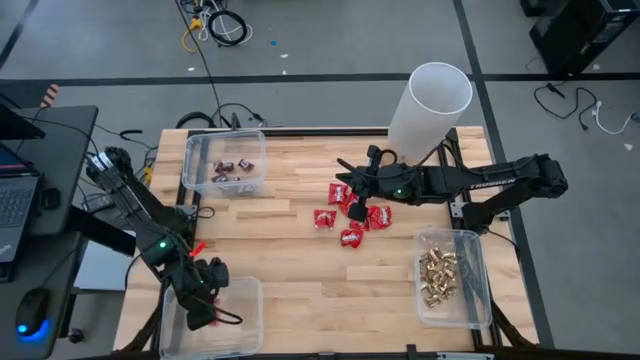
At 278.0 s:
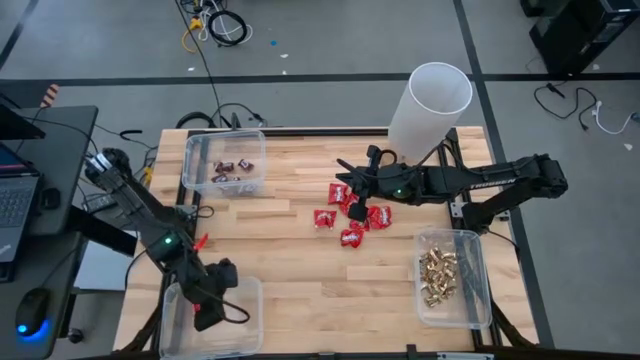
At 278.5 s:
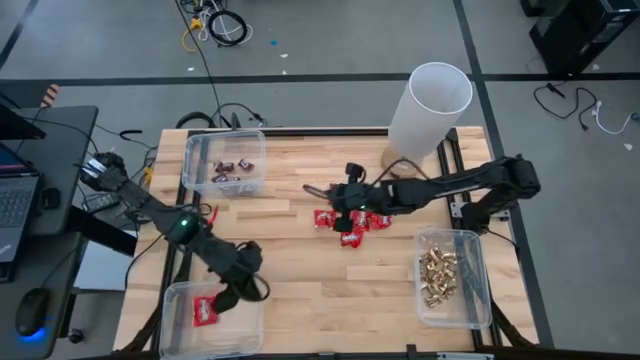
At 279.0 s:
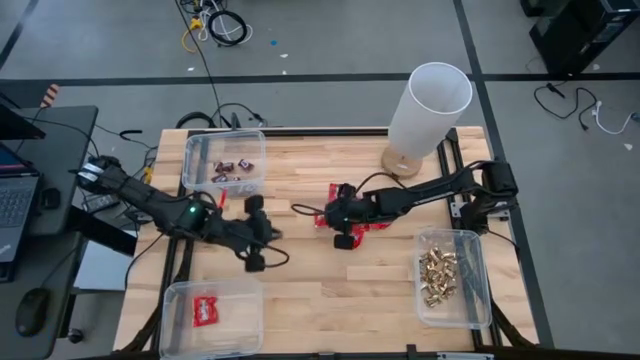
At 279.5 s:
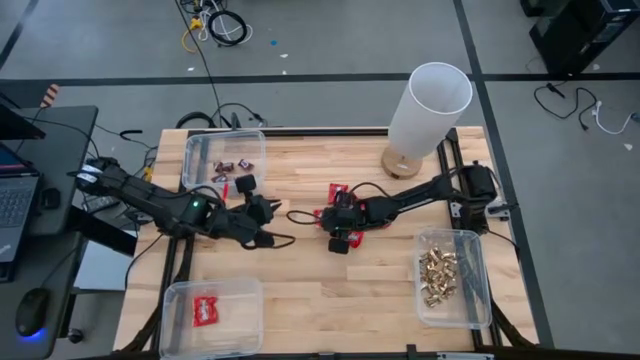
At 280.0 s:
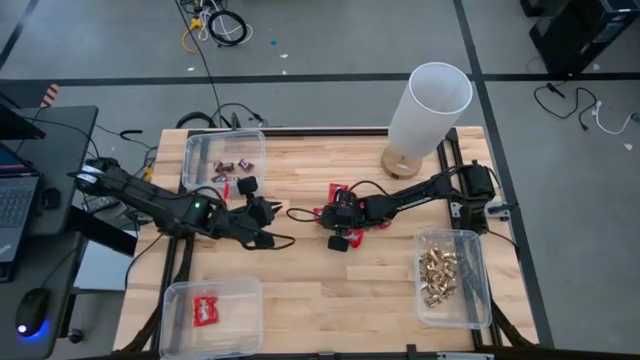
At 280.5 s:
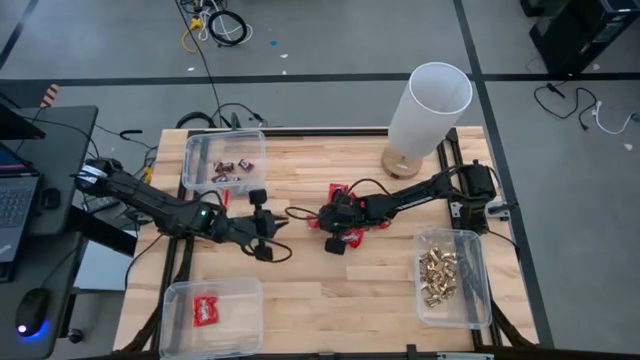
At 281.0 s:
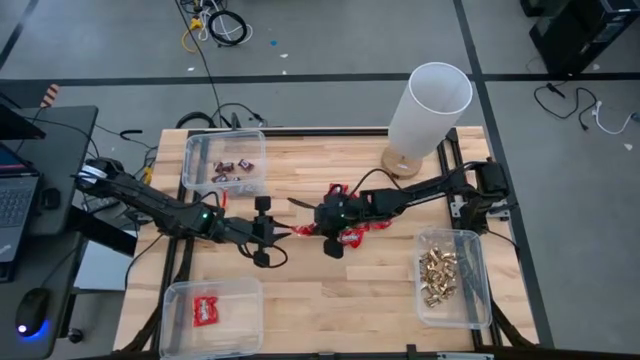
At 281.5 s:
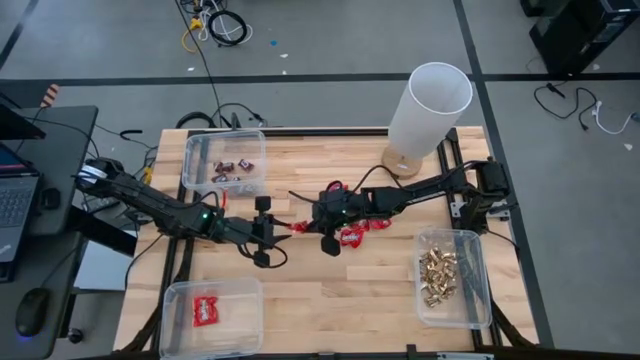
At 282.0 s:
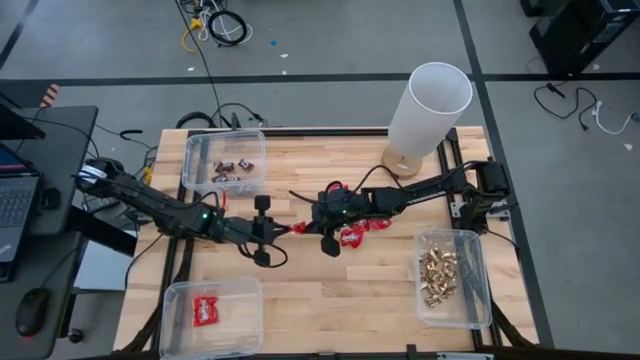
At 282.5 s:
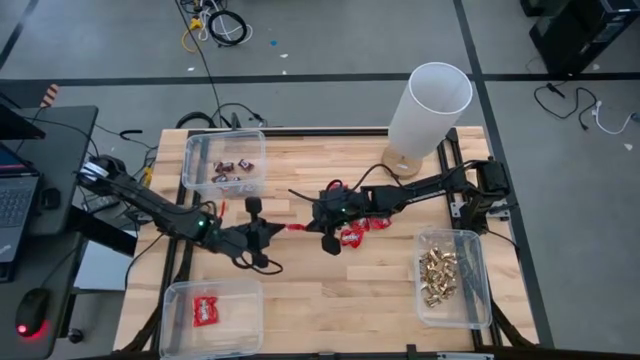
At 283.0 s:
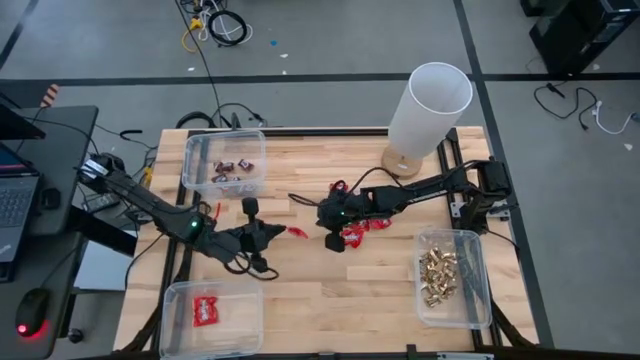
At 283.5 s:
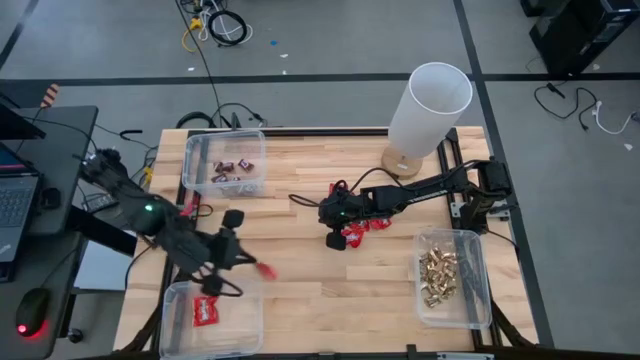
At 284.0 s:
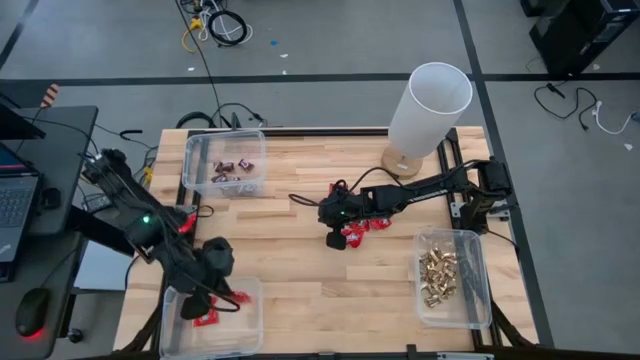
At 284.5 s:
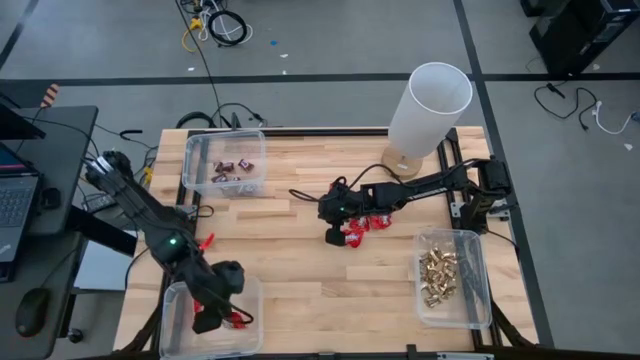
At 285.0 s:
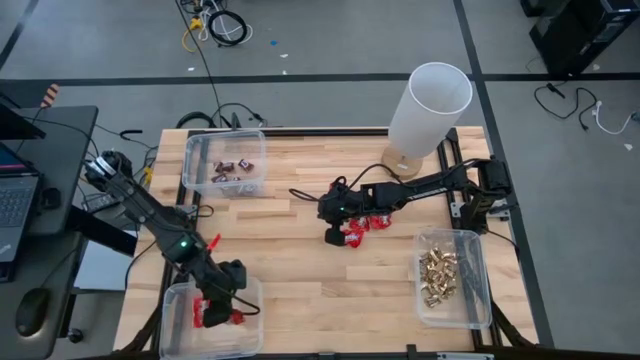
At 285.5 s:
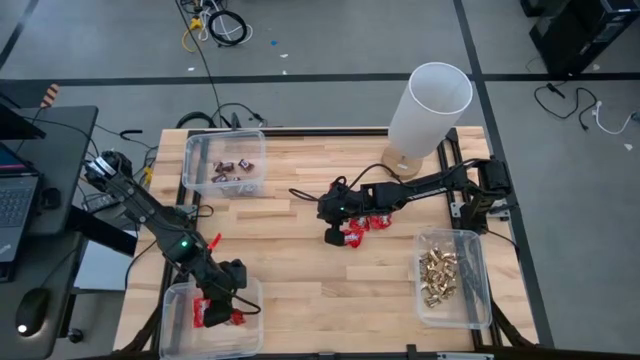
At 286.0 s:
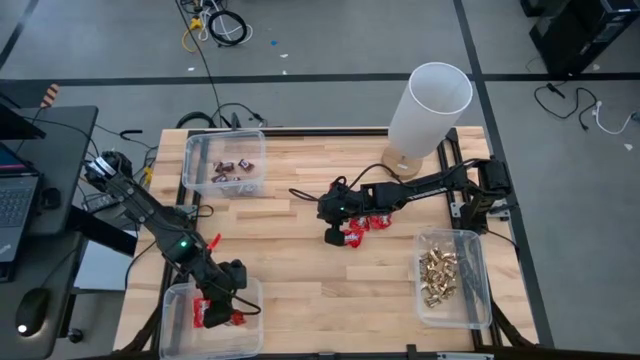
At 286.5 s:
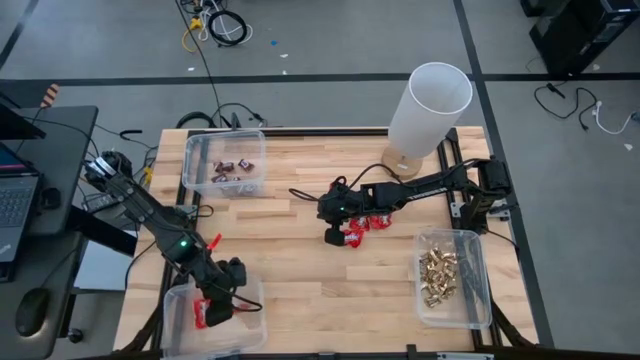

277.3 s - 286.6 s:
Task: Sort candy
Put the red chocolate into the bottom left transparent bin

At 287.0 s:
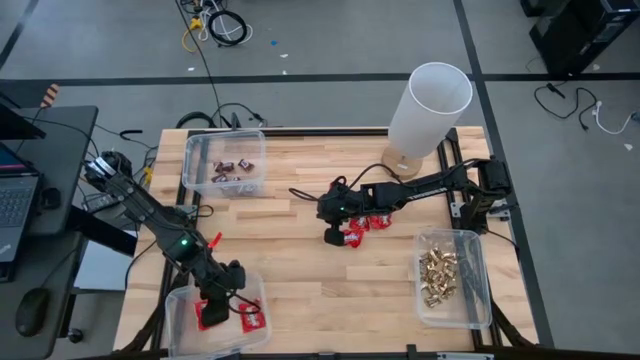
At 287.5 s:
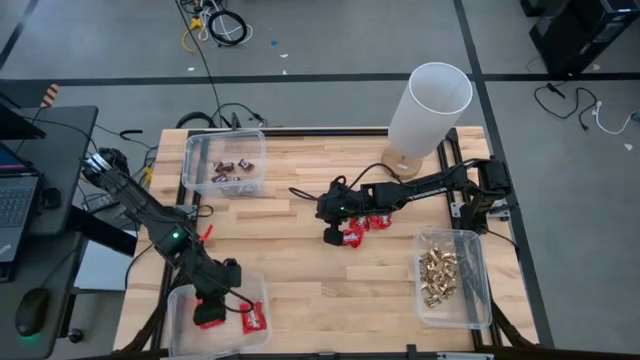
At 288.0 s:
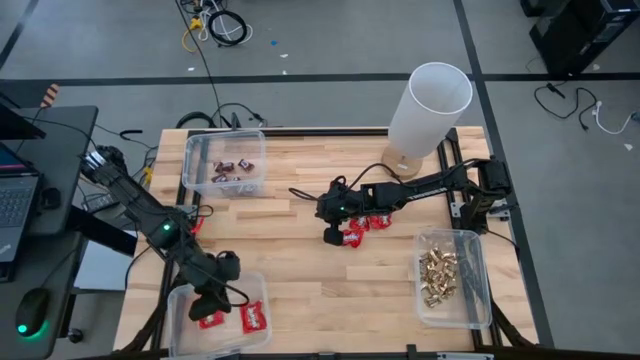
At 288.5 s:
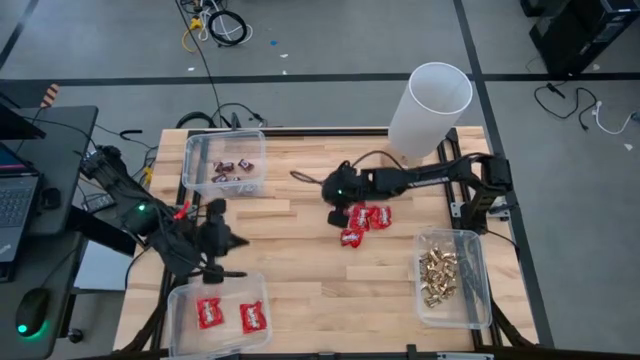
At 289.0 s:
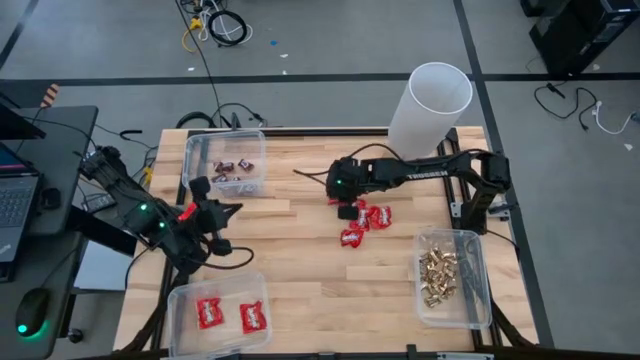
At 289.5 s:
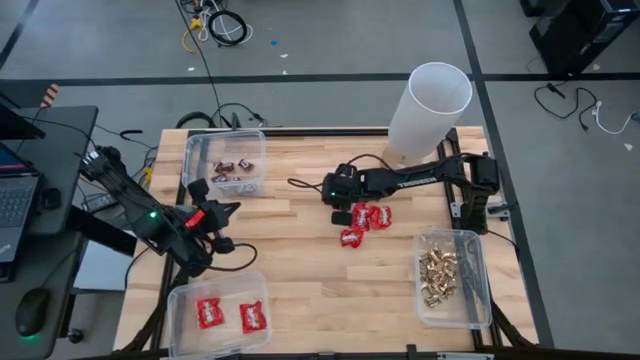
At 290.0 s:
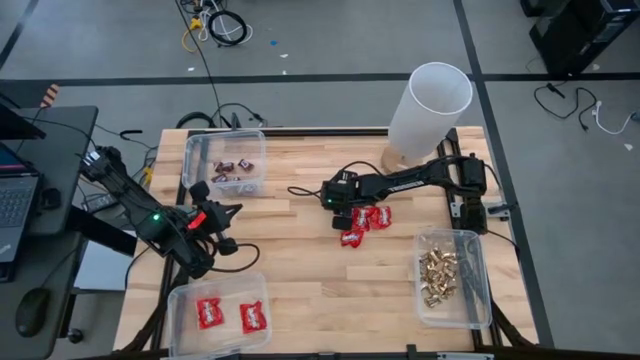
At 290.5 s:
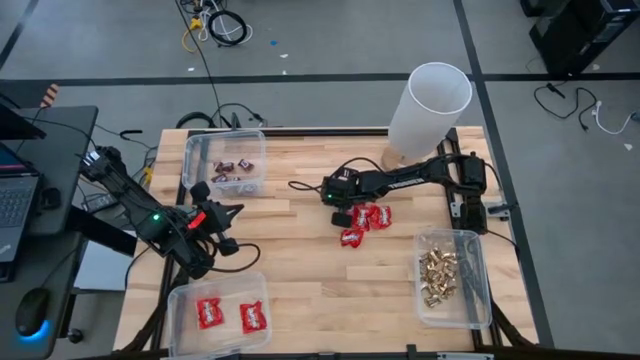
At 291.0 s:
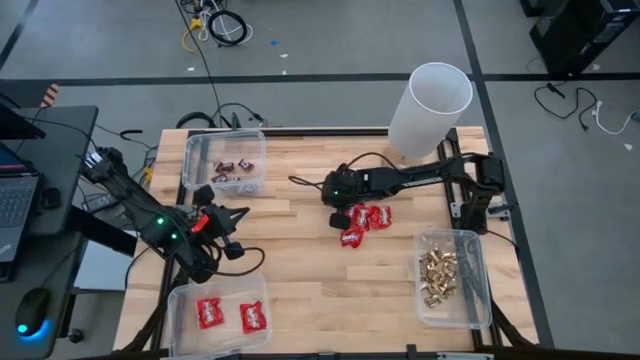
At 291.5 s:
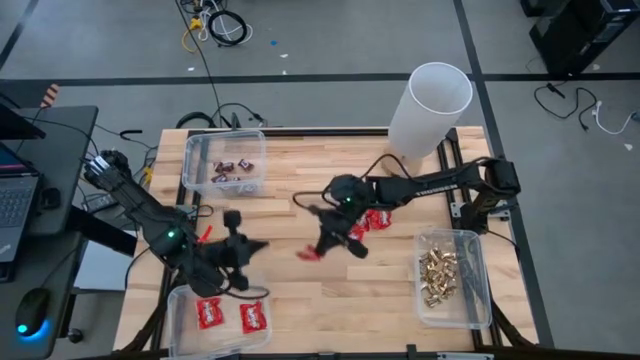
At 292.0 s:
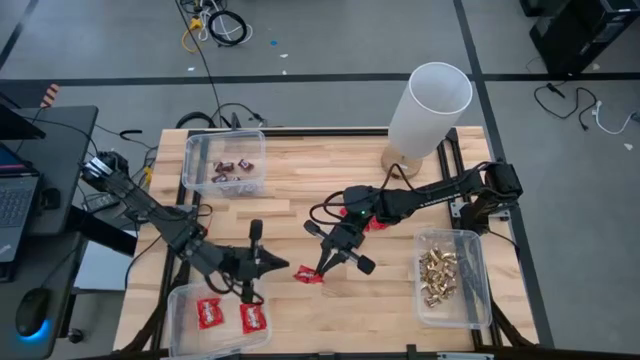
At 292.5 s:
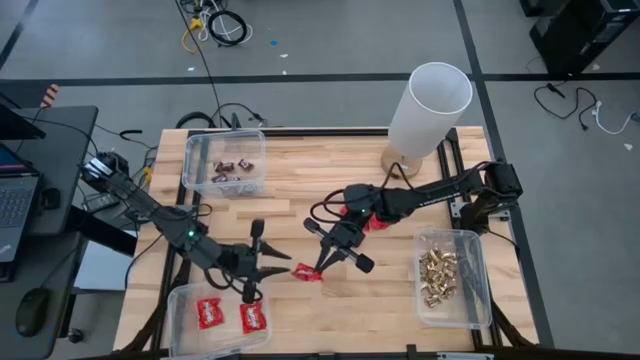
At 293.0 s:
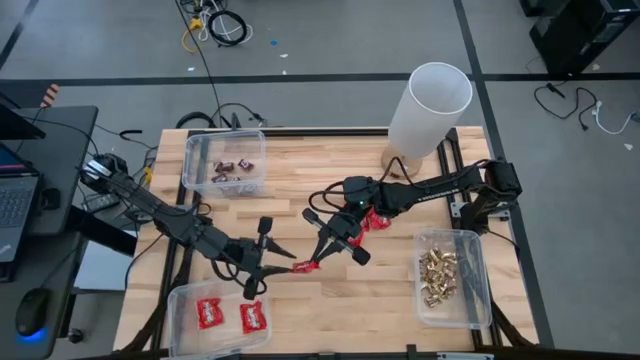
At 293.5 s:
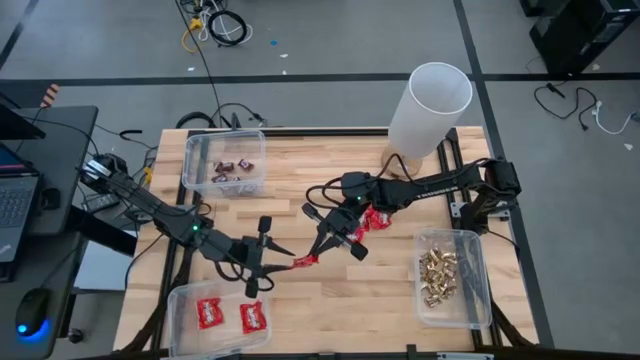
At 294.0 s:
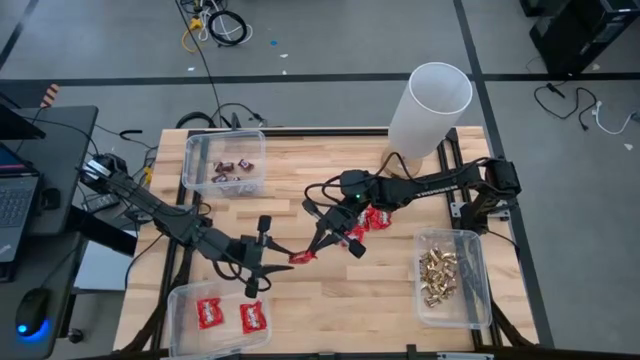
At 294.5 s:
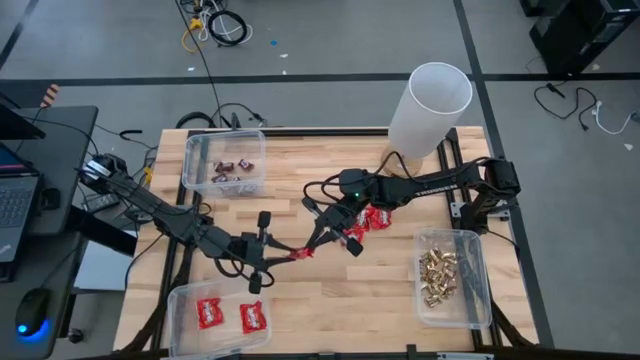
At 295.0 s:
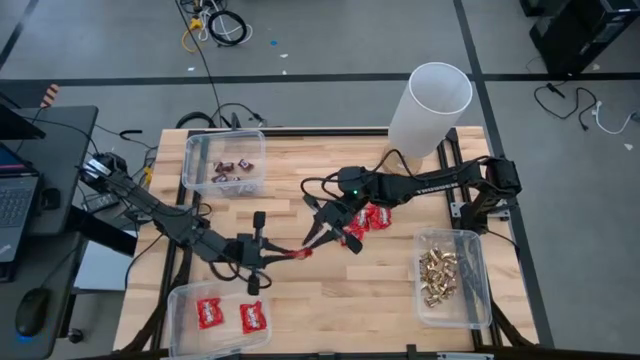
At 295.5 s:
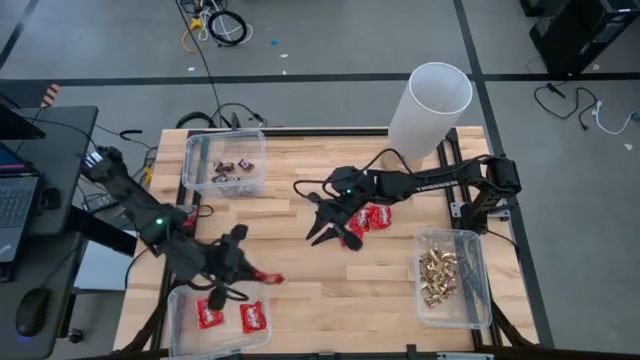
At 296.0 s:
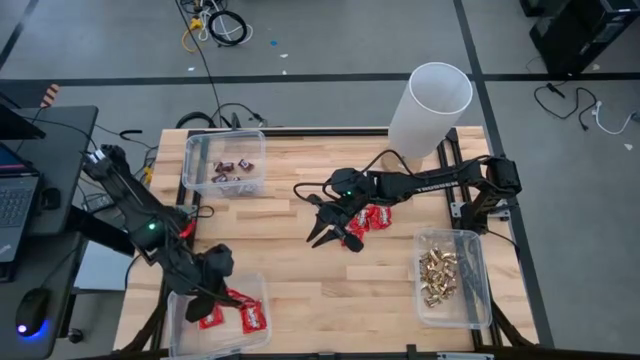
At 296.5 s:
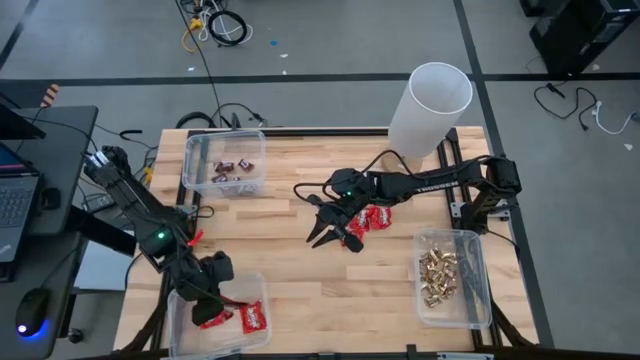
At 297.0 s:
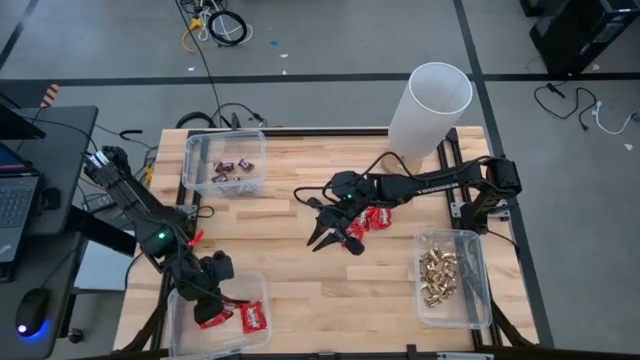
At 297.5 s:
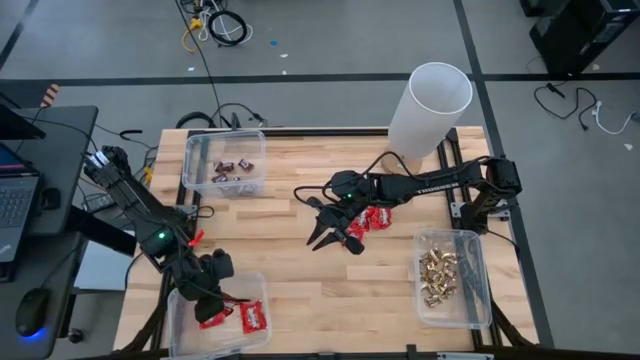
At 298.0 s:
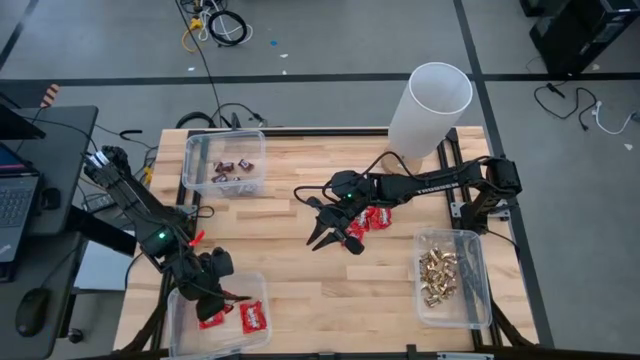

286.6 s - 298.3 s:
Put the red chocolate into the bottom left transparent bin
